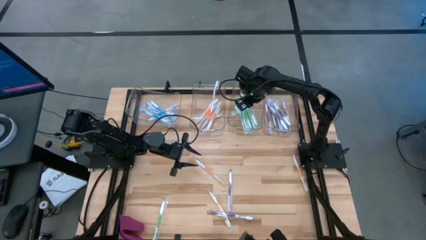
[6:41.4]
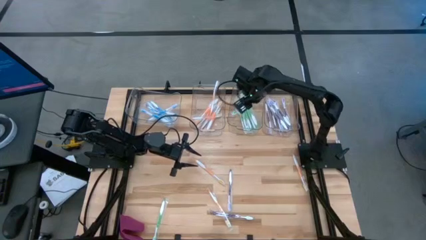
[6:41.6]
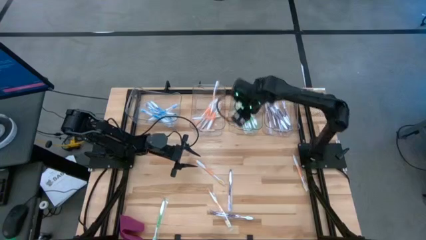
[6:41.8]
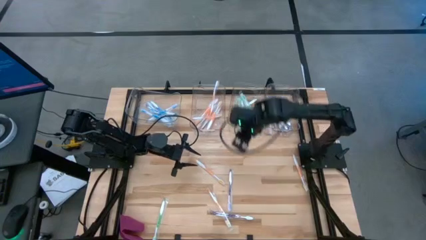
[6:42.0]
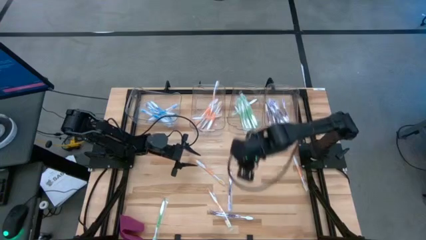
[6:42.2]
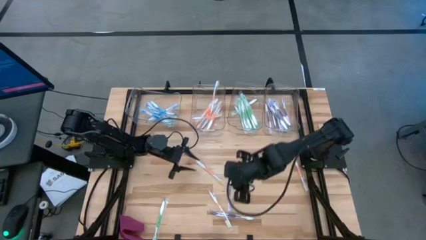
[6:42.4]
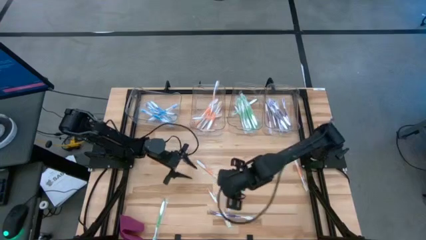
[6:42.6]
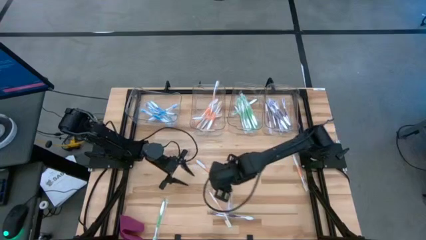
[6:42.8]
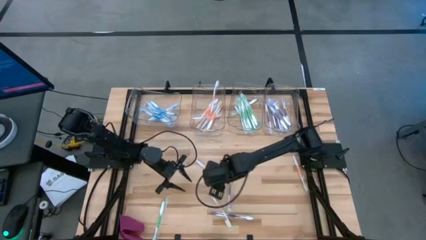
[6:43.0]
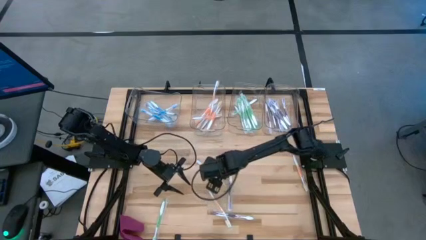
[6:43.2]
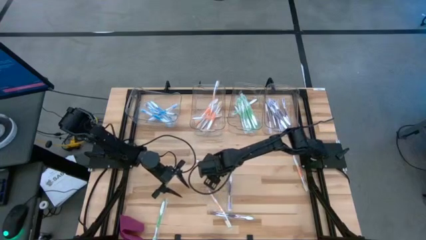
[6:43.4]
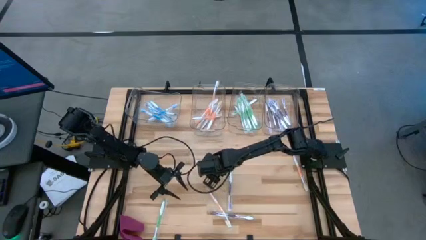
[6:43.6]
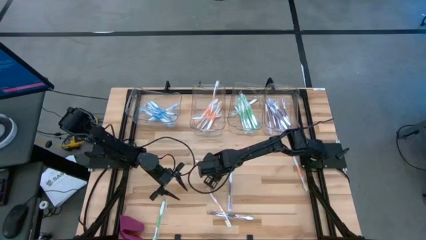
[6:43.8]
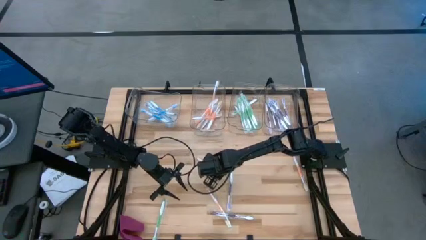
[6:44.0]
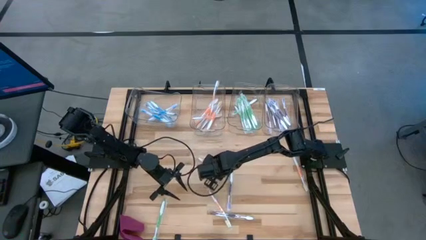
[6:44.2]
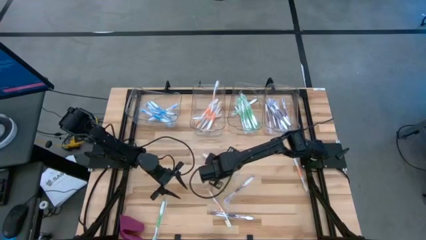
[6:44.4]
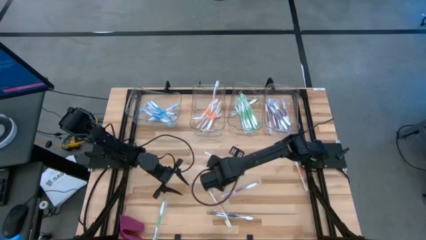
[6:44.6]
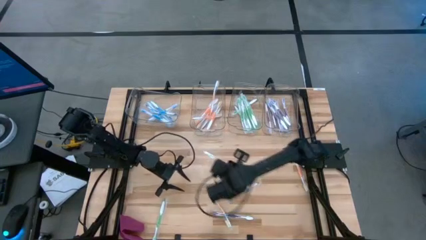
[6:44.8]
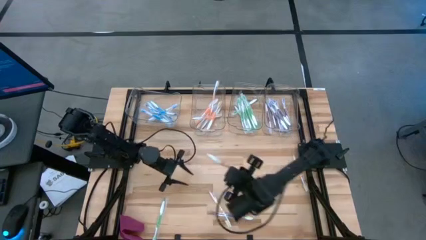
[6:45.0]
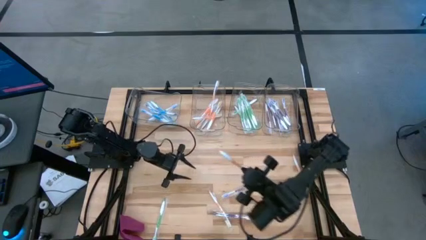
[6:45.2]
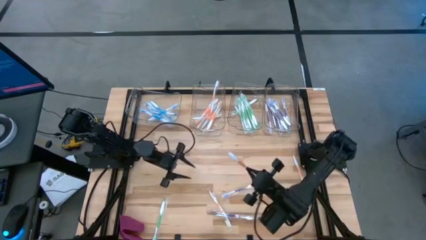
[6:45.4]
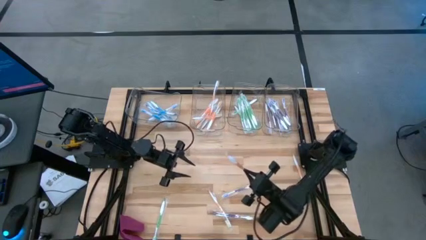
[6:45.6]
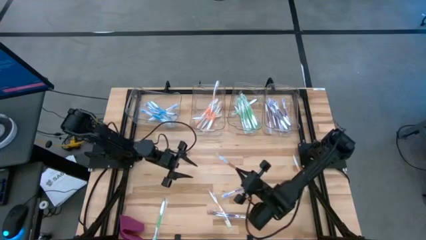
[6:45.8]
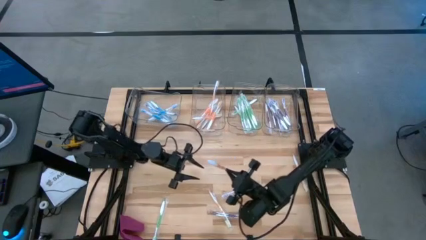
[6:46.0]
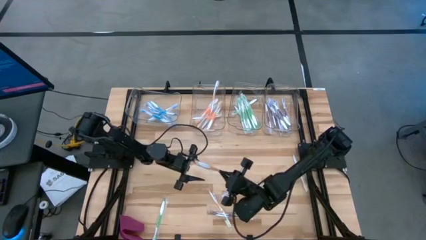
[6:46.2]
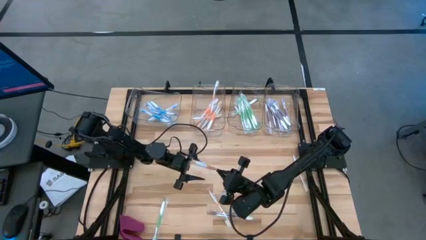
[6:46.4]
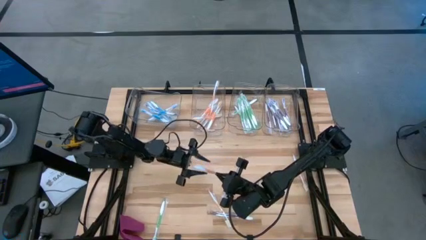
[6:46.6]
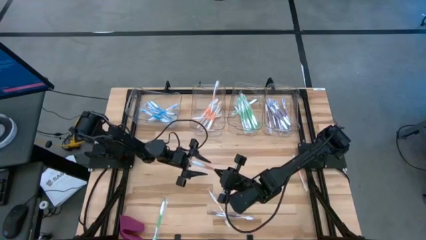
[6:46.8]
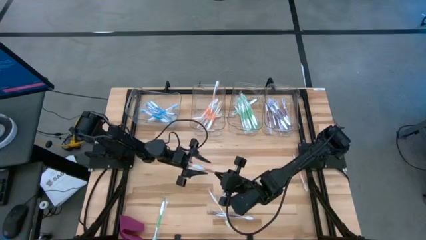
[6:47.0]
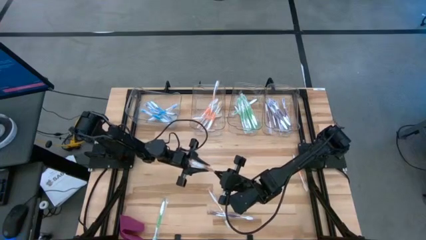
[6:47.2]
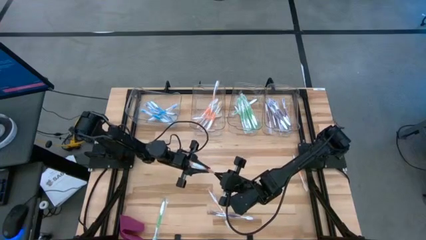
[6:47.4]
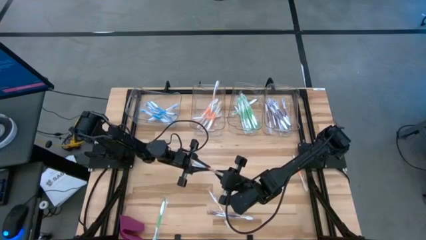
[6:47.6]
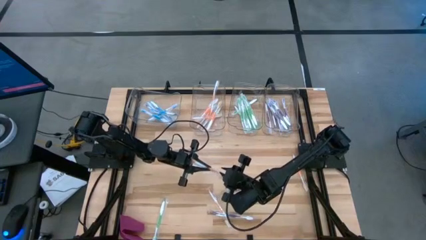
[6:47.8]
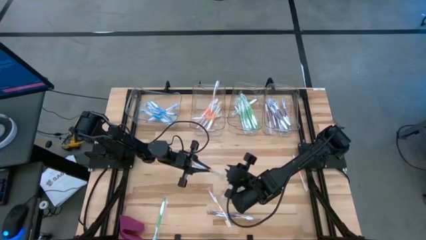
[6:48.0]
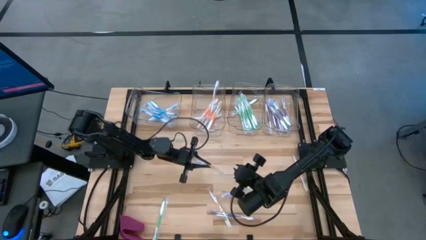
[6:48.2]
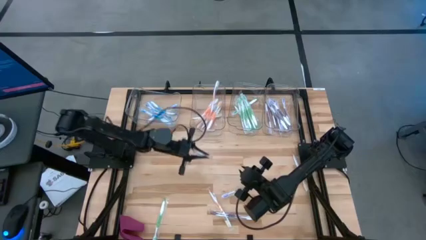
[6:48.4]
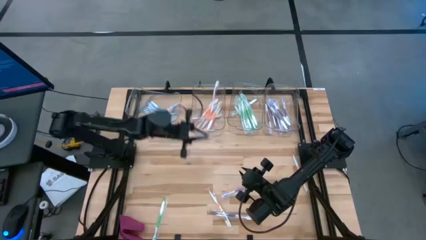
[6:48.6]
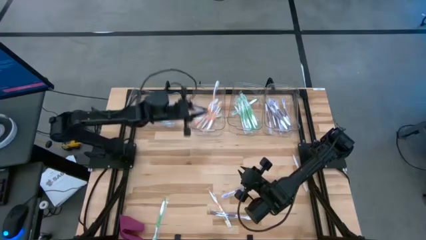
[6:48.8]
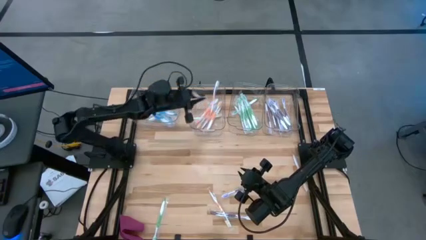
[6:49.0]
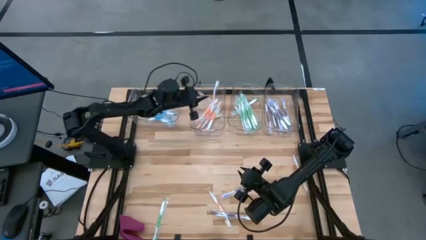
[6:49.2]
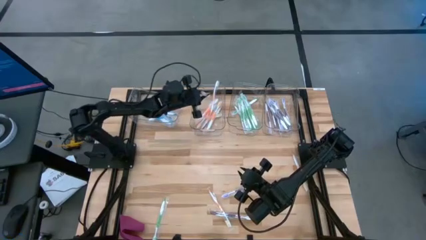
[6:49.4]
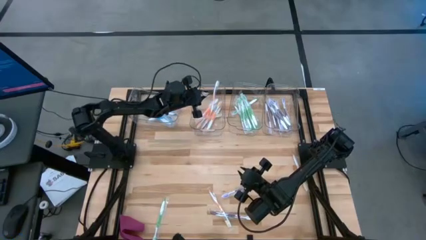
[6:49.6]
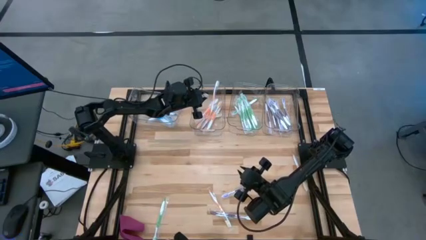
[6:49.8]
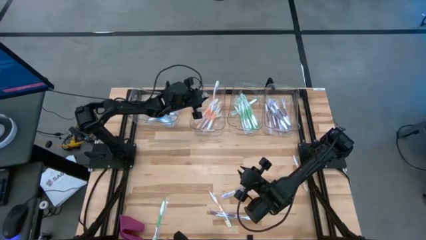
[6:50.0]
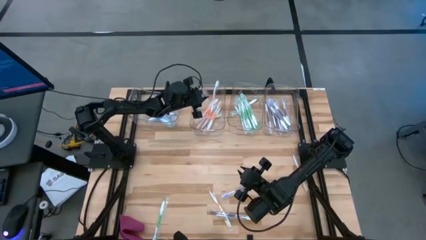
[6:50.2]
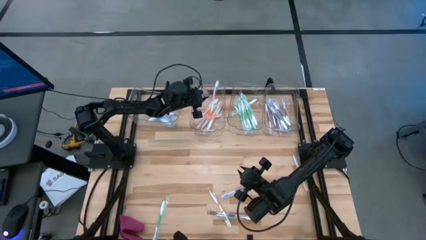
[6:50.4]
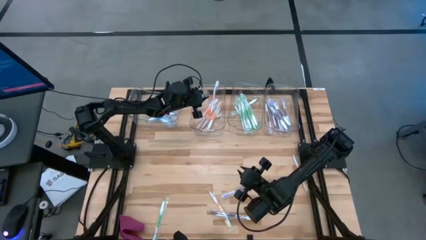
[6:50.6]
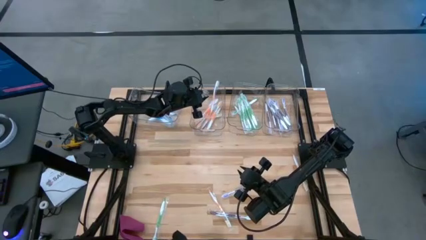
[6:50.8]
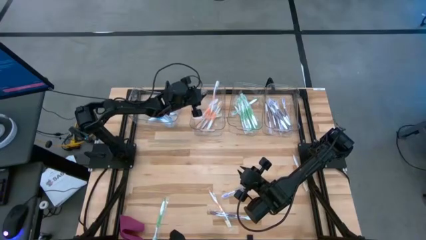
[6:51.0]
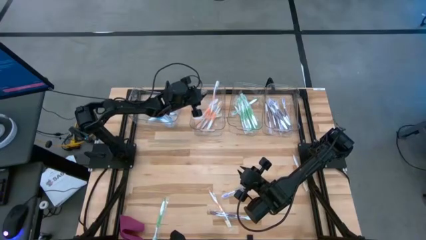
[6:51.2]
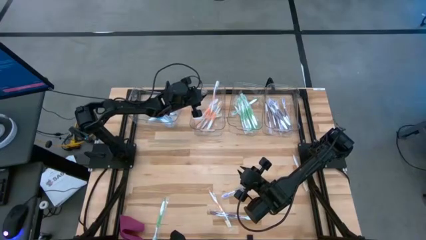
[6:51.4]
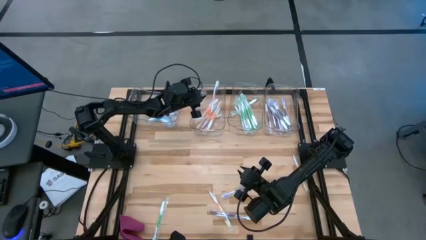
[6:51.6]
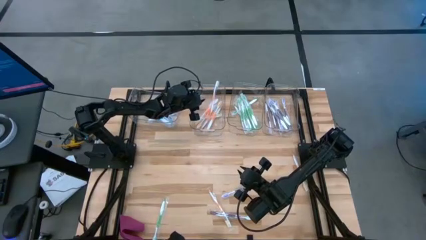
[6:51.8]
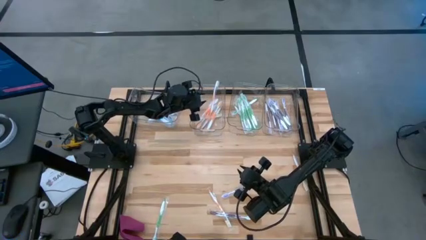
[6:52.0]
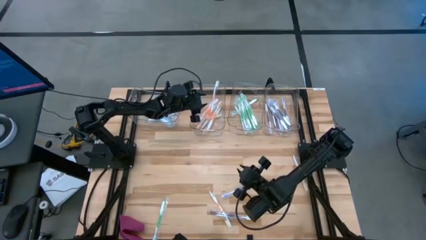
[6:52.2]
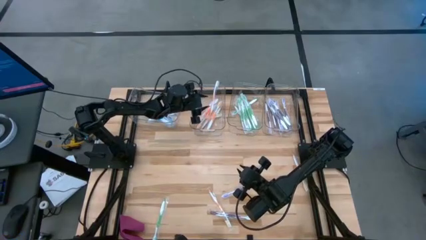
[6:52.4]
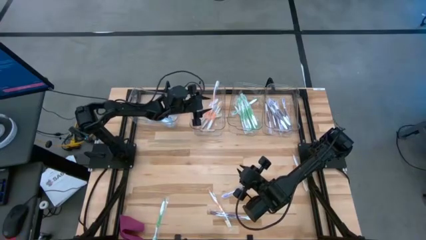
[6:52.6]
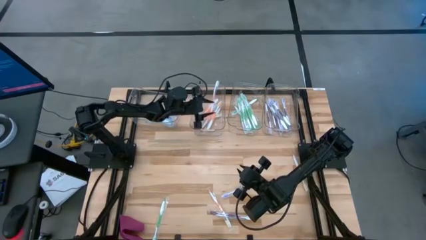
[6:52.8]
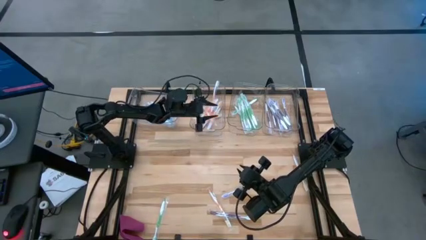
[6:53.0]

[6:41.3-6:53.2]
Task: Pick & Place Toothbrushes
Put the orange toothbrush into the middle left transparent bin

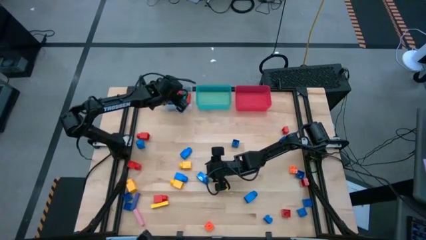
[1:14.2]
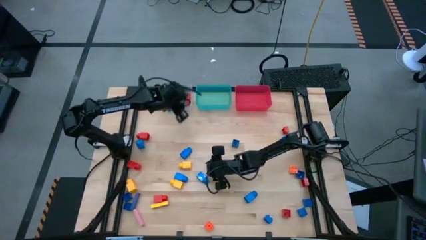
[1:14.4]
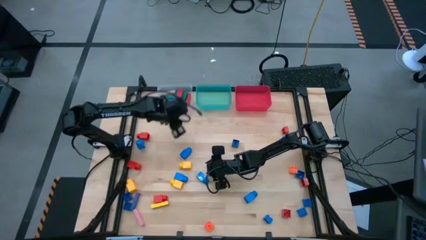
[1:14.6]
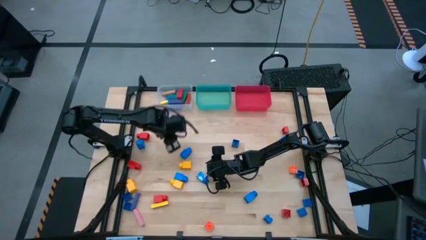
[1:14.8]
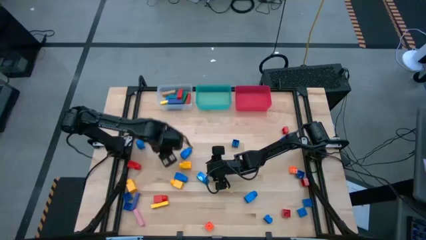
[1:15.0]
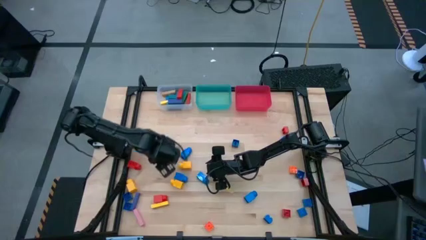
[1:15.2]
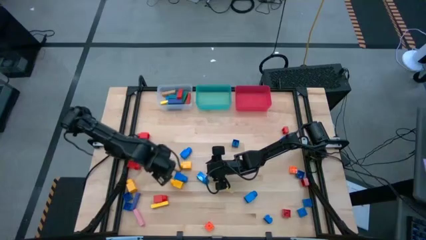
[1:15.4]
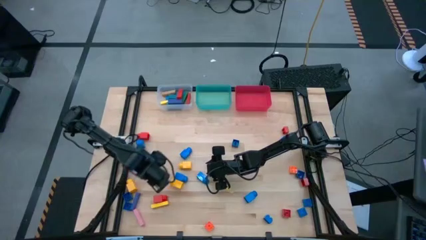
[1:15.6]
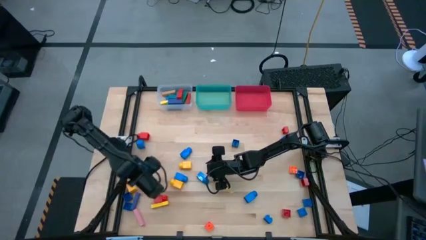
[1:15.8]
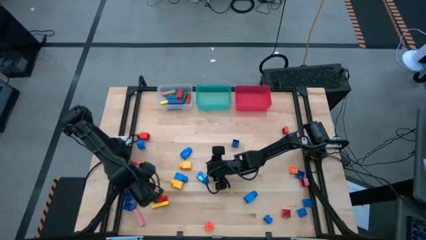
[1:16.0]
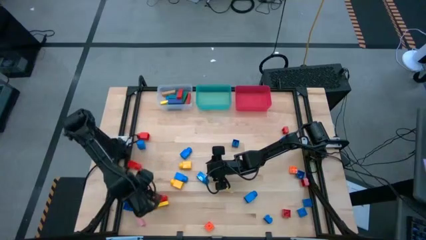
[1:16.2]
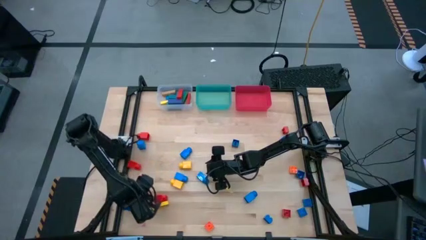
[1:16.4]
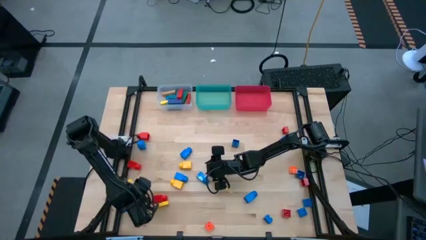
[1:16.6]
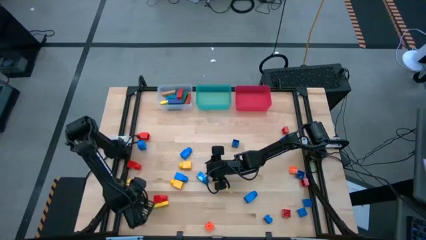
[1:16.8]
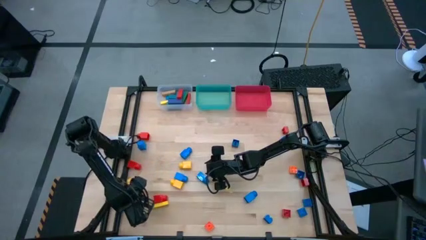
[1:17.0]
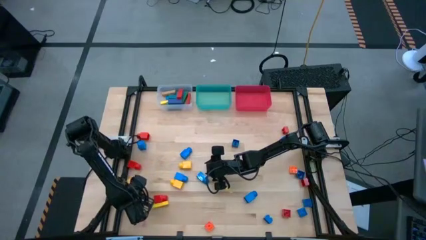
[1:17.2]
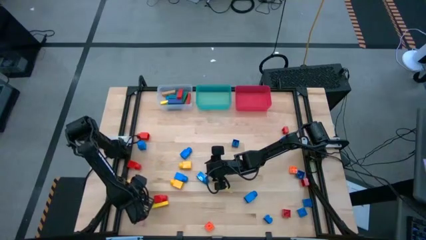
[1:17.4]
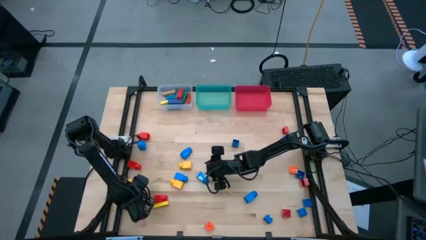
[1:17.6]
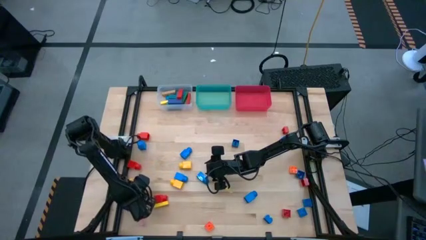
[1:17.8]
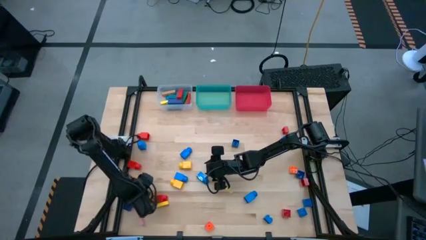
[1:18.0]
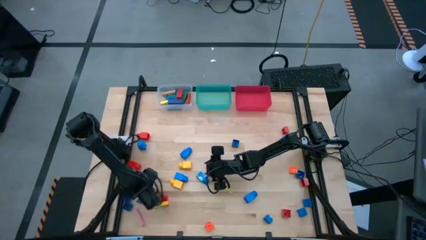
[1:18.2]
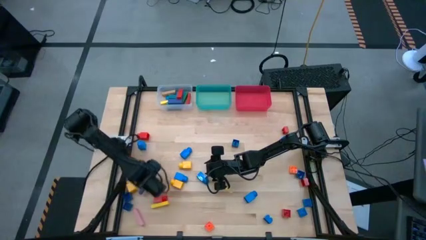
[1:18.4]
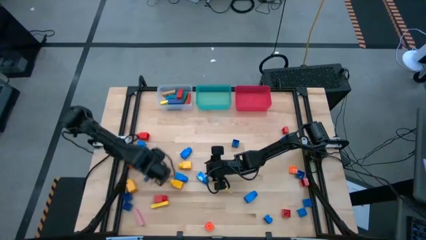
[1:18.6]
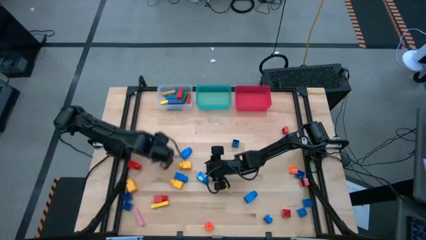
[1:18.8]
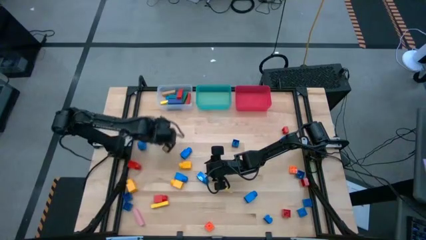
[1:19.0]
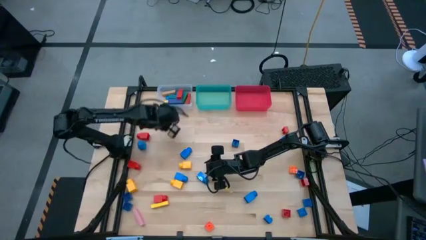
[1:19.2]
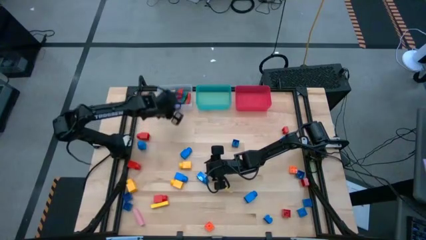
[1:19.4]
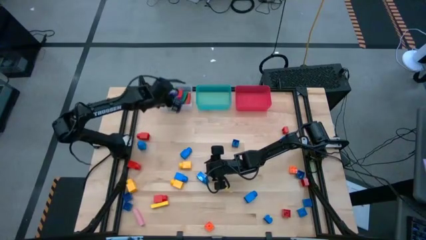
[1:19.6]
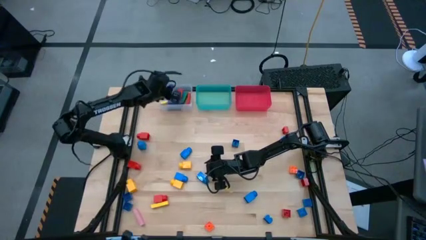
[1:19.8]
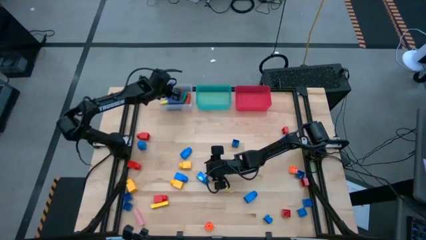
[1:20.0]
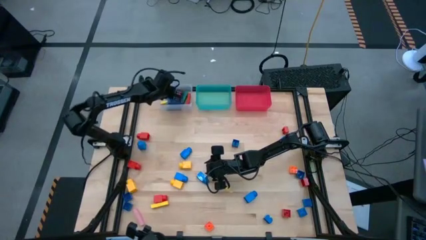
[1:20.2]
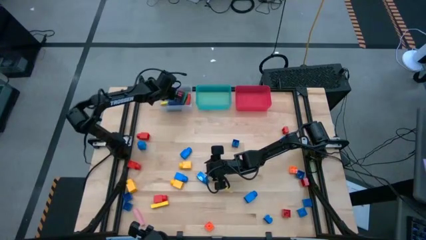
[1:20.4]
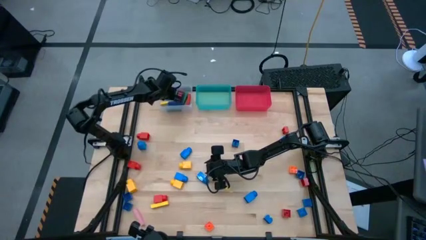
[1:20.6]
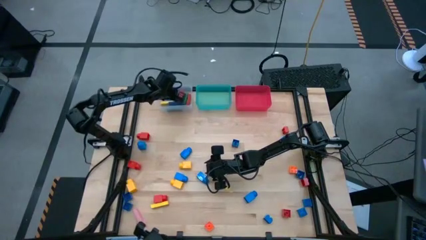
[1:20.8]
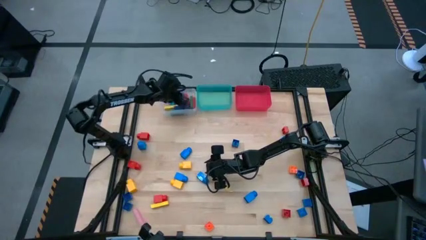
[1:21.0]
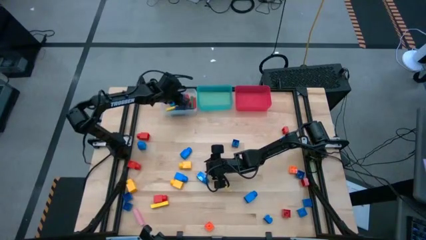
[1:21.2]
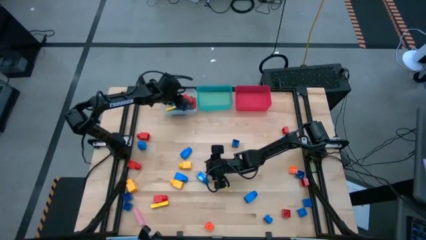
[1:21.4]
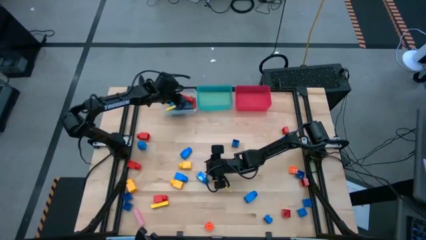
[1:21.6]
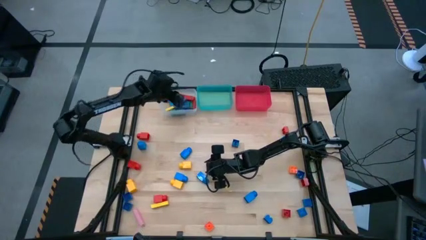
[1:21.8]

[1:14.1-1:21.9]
Task: Sort blocks by size
Put the dark blue block into the transparent bin
